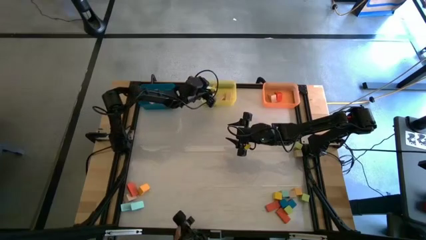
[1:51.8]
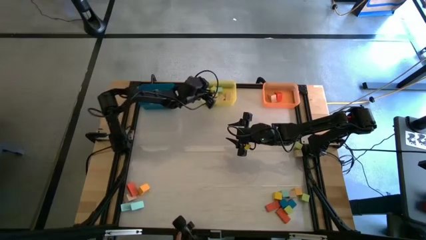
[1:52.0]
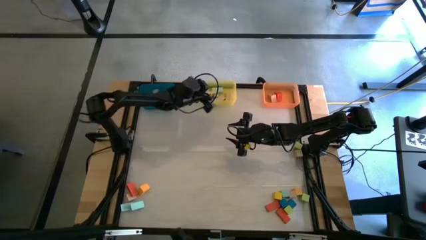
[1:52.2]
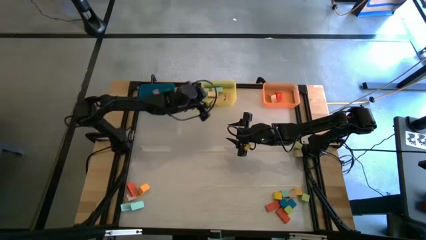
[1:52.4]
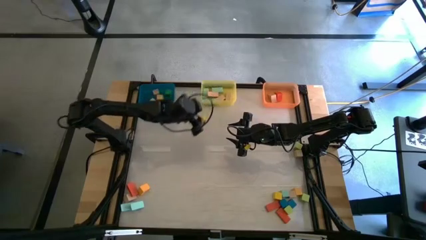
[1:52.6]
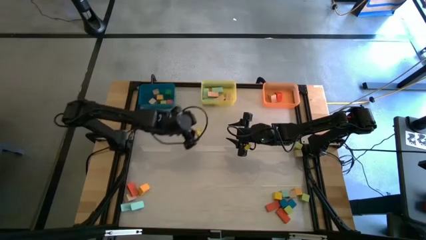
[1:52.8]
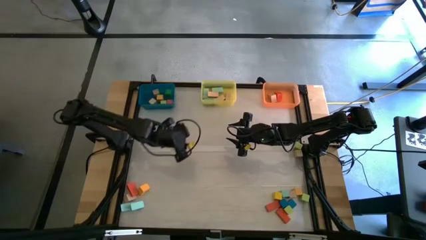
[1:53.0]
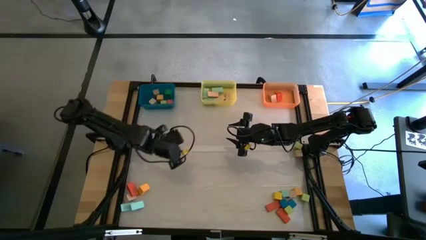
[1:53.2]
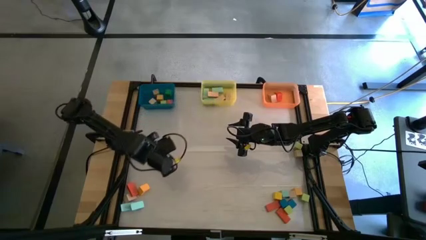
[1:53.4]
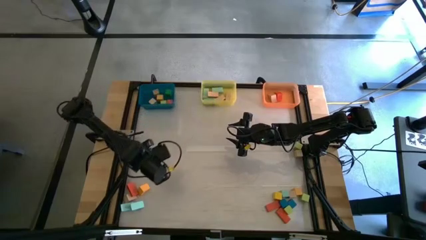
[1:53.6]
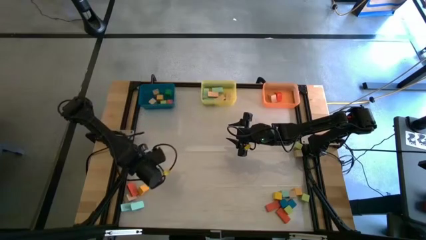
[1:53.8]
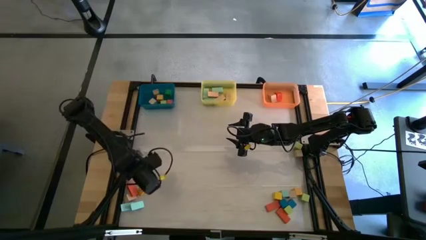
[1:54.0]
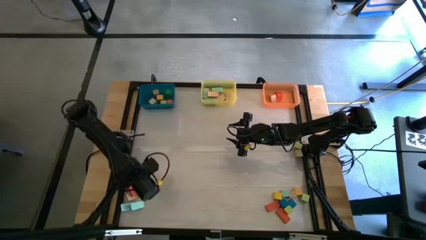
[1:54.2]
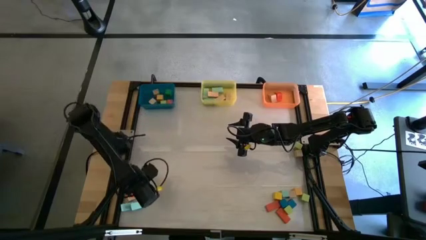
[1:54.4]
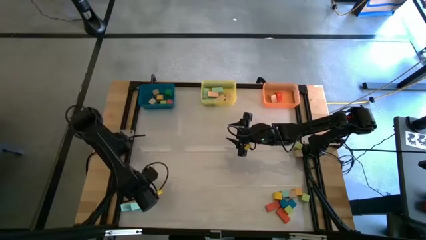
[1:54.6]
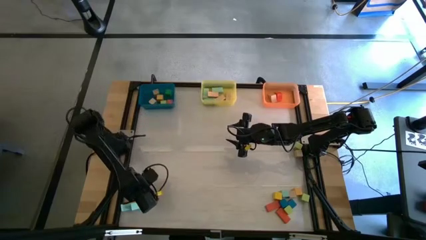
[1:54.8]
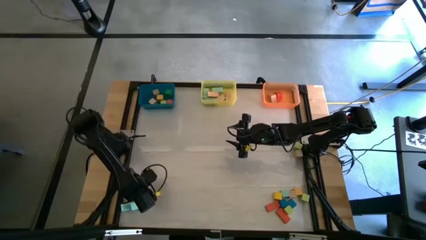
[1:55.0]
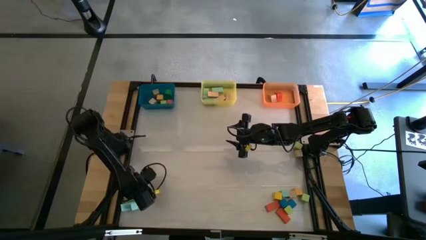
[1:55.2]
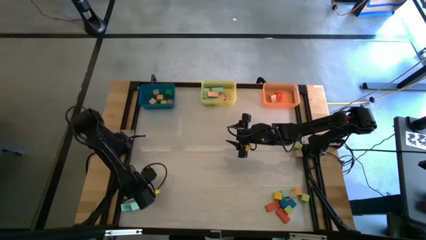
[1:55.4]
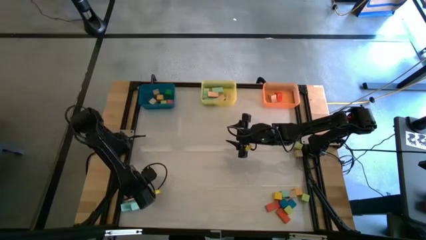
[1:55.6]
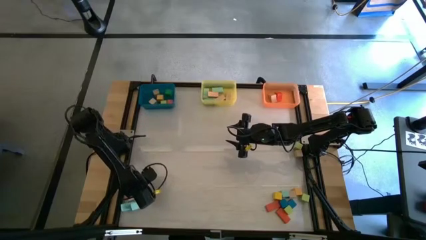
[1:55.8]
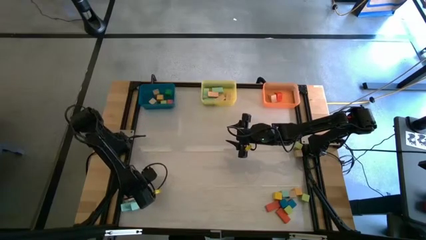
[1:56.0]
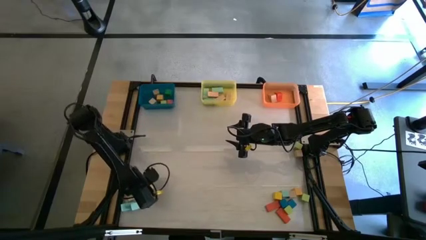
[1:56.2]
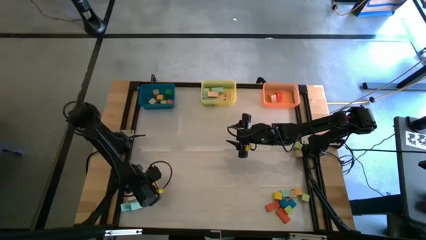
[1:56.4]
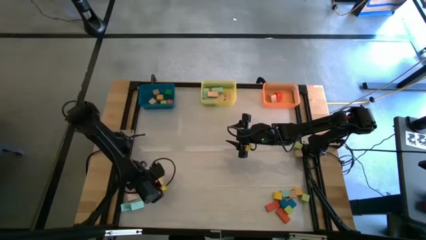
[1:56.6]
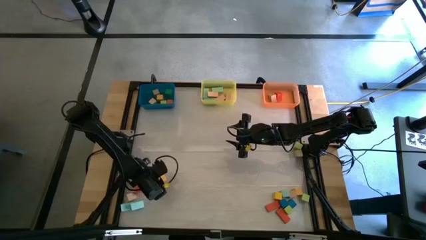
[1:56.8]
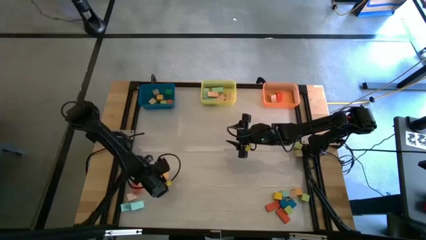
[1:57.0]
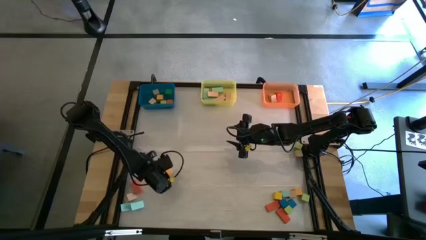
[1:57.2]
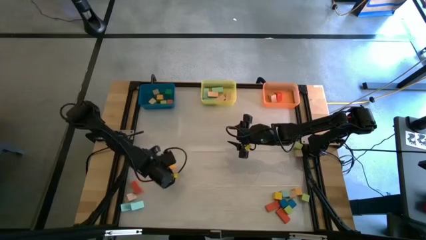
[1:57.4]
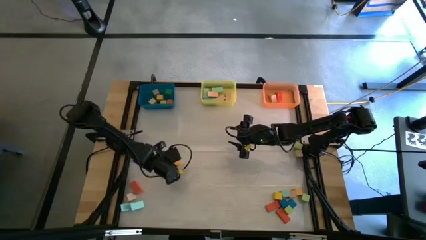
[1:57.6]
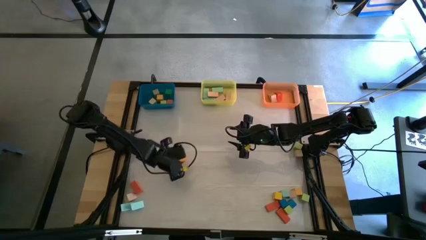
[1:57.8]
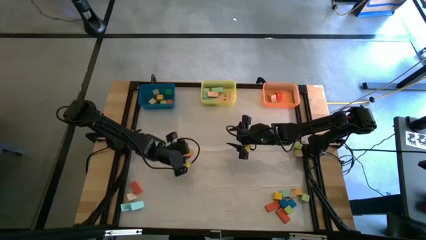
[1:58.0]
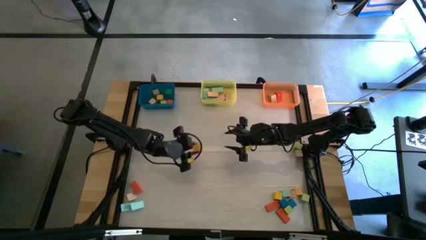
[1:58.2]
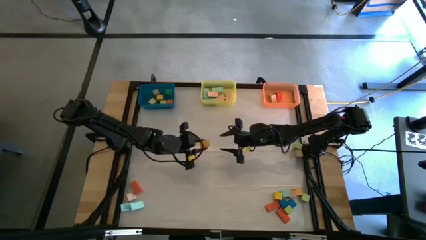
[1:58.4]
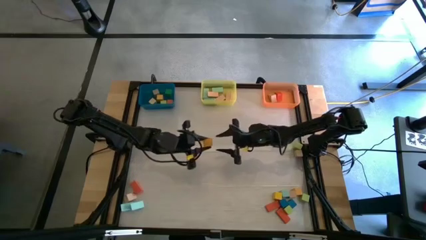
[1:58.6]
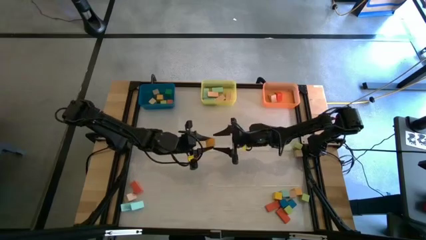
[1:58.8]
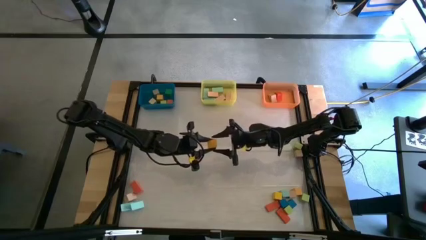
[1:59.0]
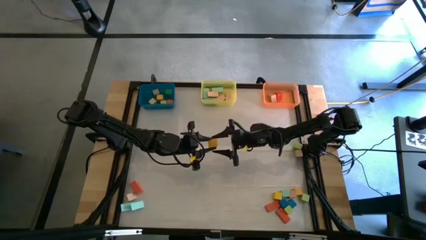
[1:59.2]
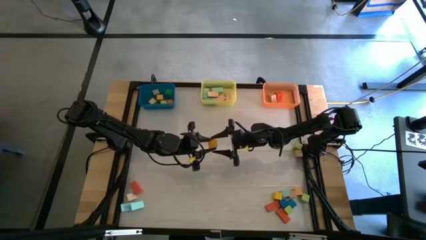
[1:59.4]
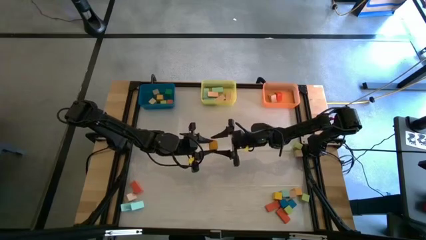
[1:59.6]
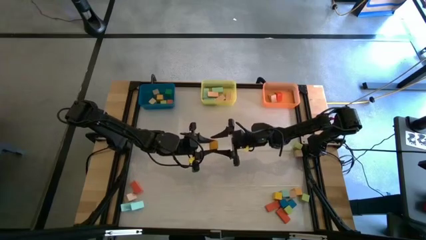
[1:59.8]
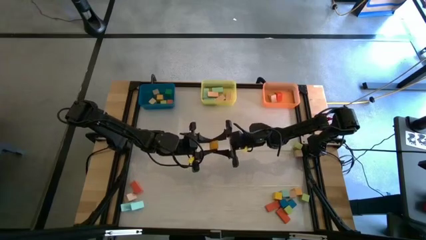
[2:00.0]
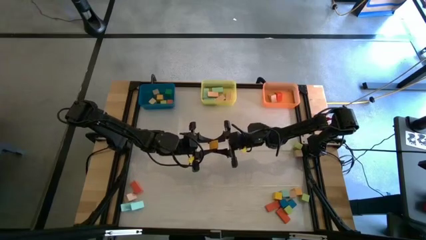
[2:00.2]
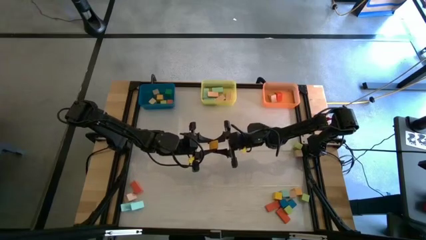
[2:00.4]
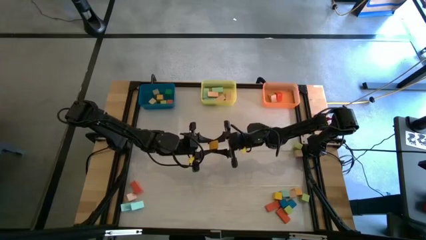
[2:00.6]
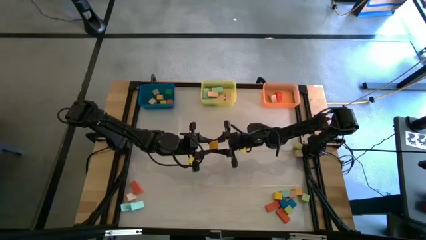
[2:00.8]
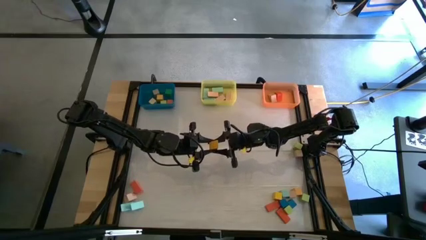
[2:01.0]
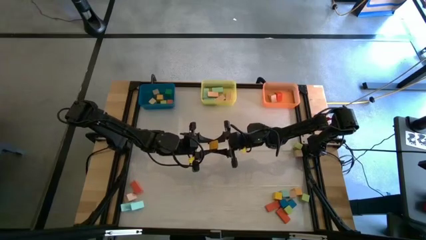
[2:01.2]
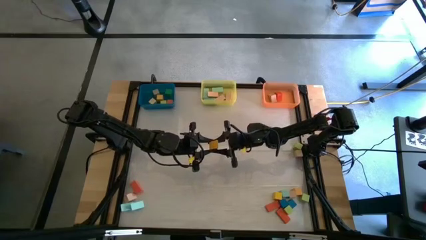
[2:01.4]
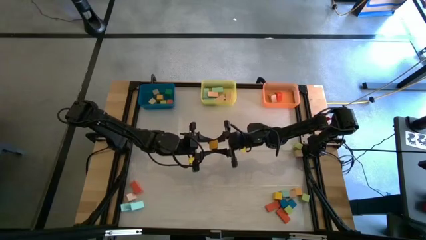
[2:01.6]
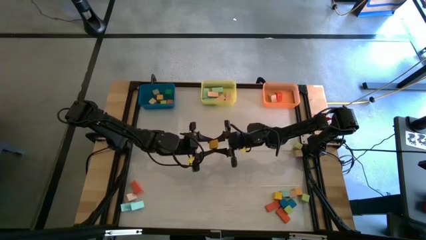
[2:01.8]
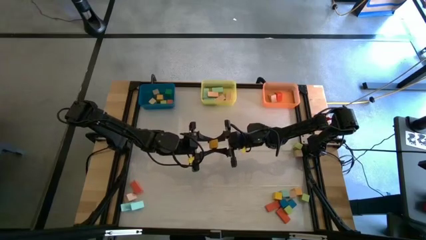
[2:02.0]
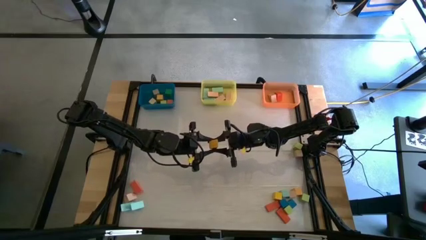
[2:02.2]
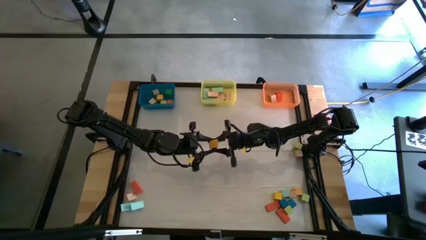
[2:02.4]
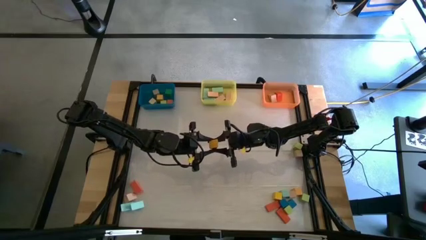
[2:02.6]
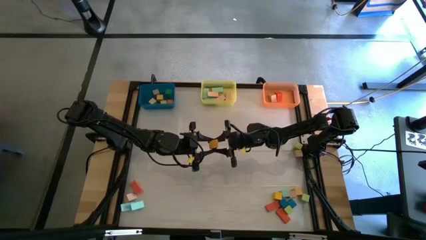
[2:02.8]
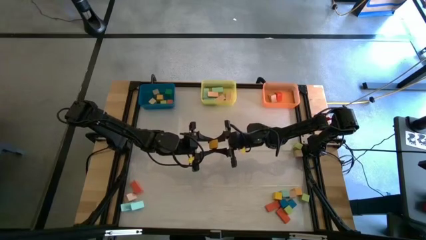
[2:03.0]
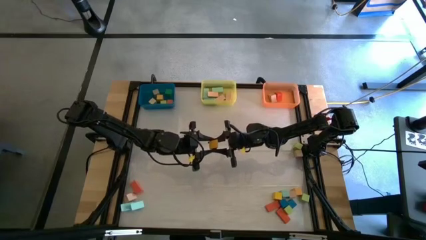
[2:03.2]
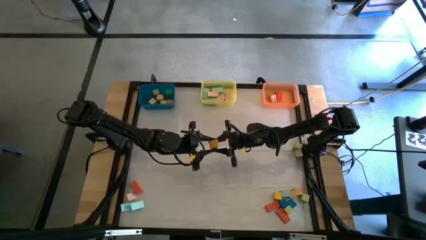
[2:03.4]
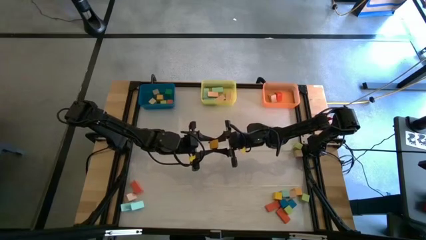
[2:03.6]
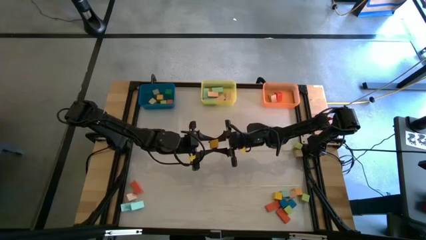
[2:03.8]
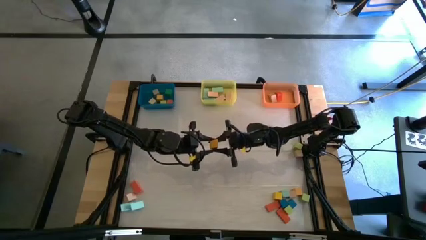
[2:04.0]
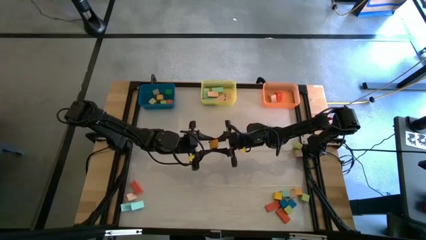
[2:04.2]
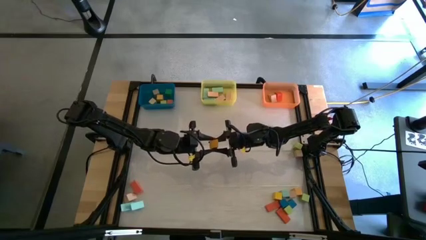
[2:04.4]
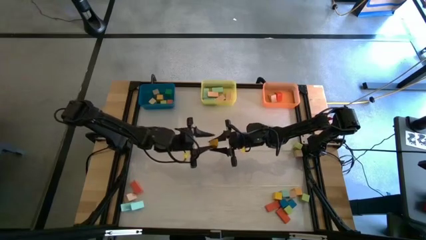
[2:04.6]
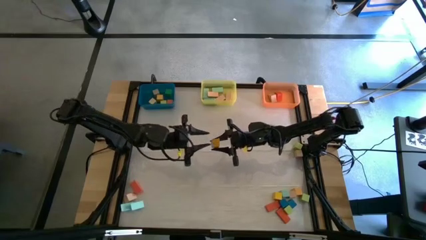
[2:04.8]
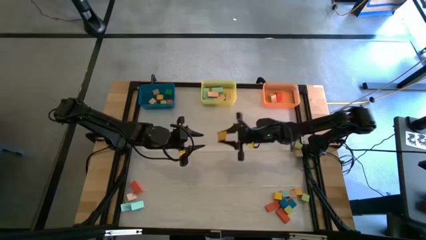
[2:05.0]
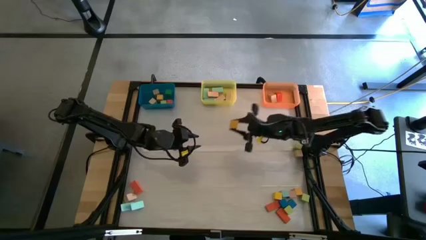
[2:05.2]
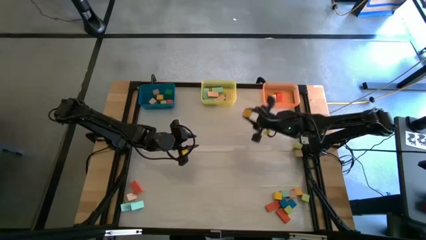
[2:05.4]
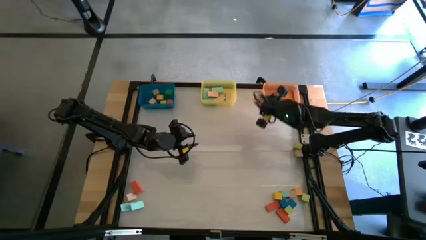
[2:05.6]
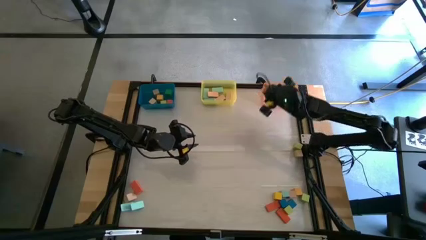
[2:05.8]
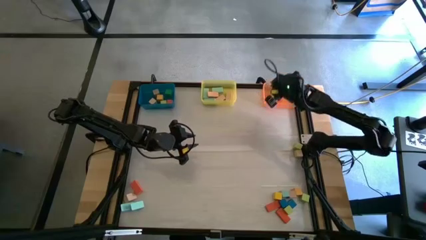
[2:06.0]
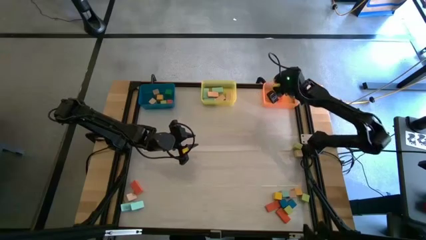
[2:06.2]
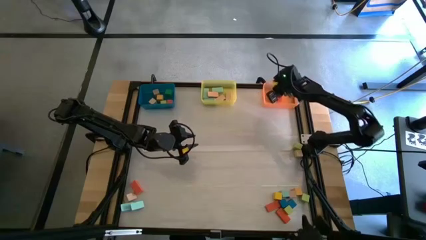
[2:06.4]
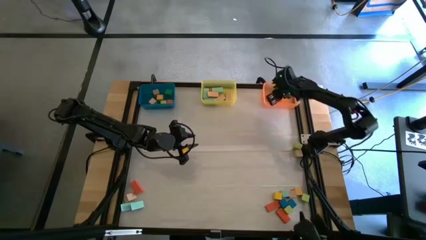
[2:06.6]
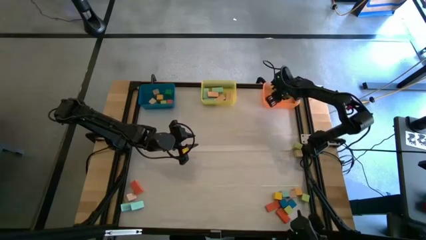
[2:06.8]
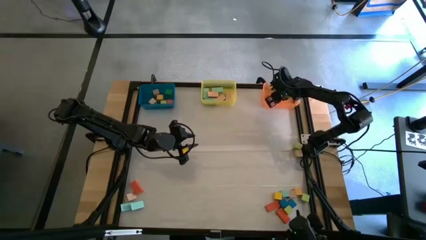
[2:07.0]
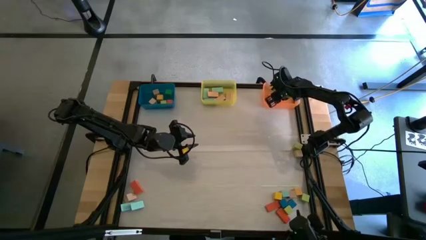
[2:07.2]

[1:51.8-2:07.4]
Task: Sort blocks by size
Put the yellow triangle block into the orange bin

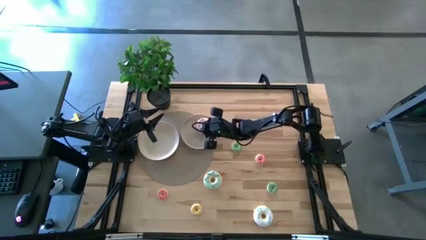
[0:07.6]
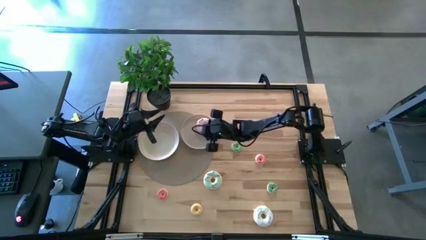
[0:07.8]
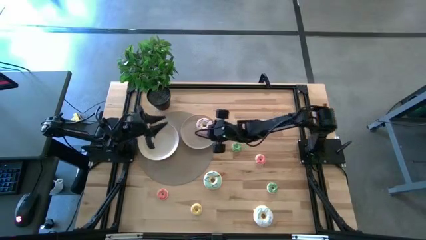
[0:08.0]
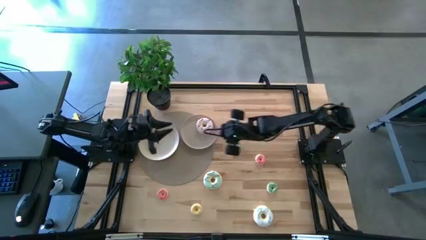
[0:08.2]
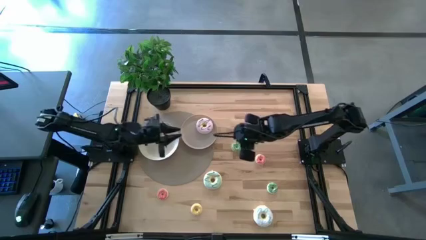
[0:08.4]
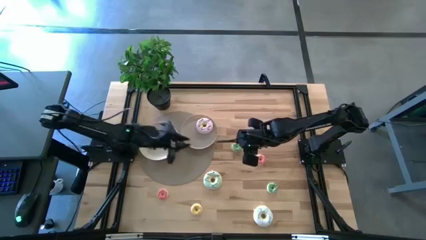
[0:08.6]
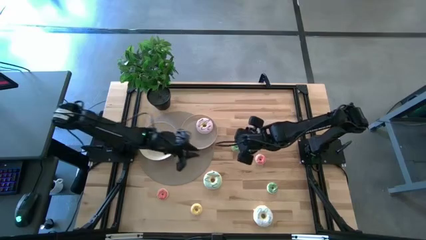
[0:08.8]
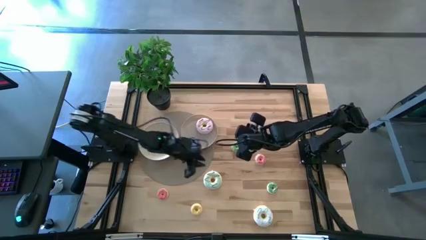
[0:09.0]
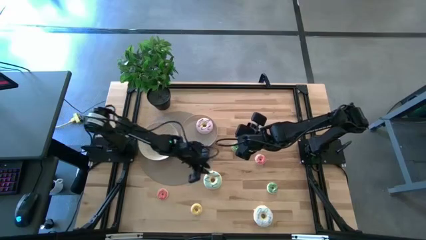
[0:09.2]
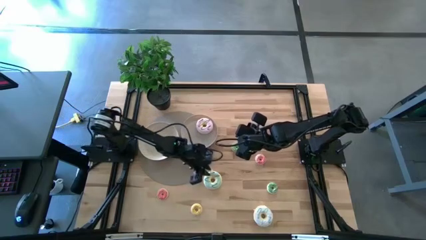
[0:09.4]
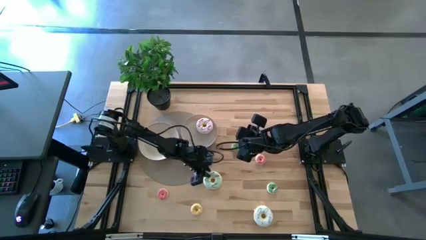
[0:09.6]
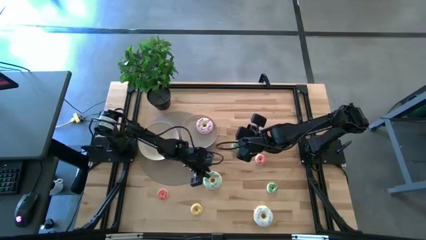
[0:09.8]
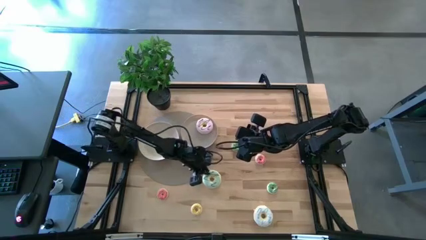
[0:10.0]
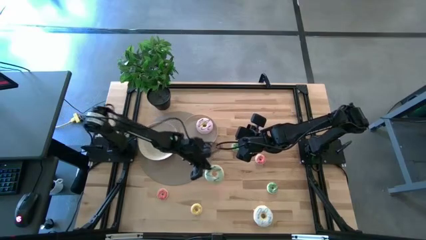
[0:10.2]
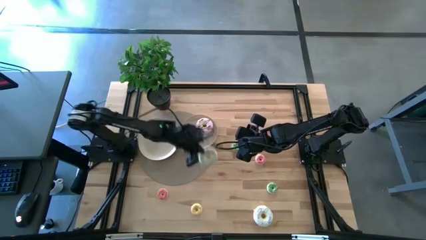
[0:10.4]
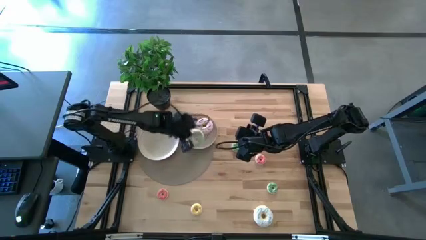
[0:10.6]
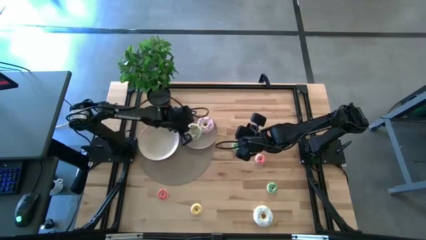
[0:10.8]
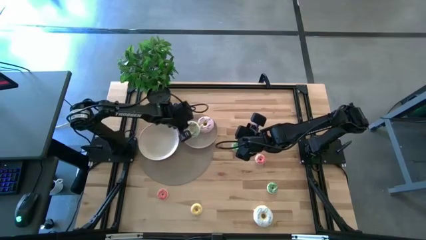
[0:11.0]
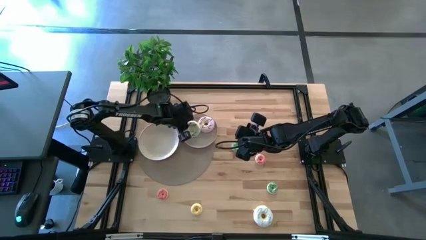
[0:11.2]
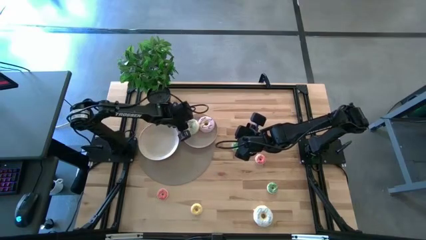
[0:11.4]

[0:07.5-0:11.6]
Task: Pick & Place donuts
Put the large blue donut on the light brown plate
